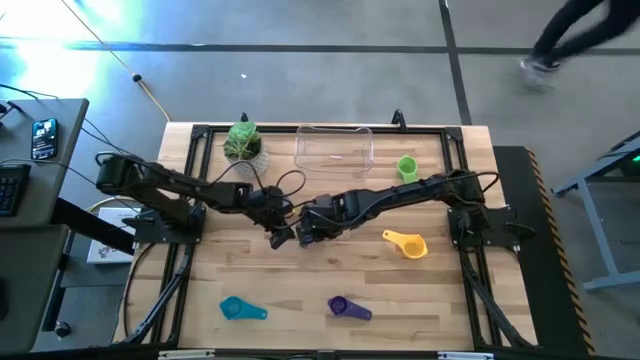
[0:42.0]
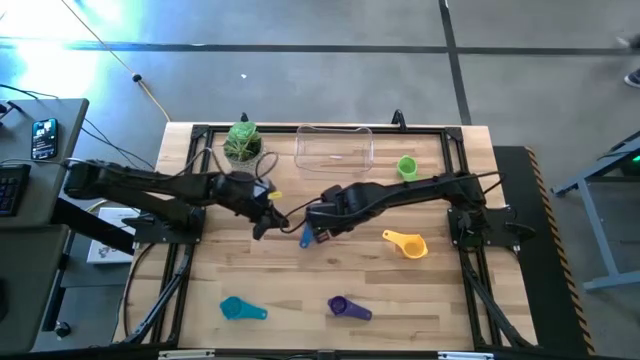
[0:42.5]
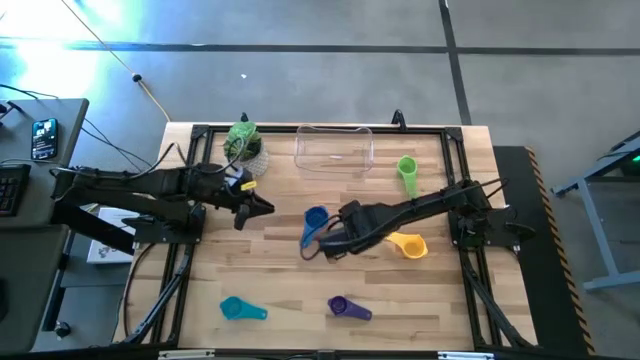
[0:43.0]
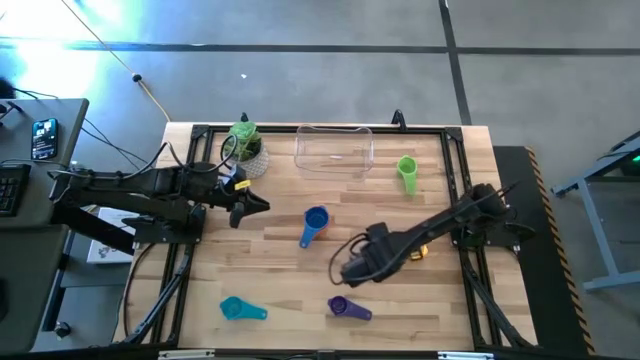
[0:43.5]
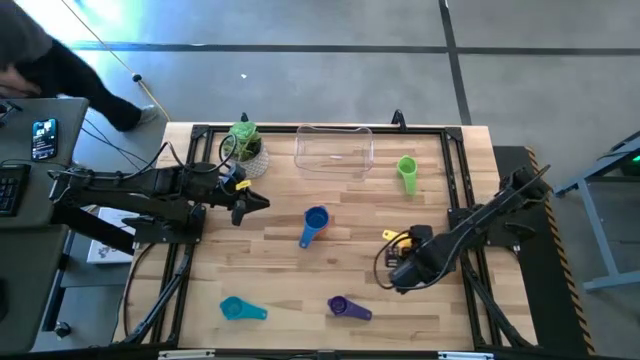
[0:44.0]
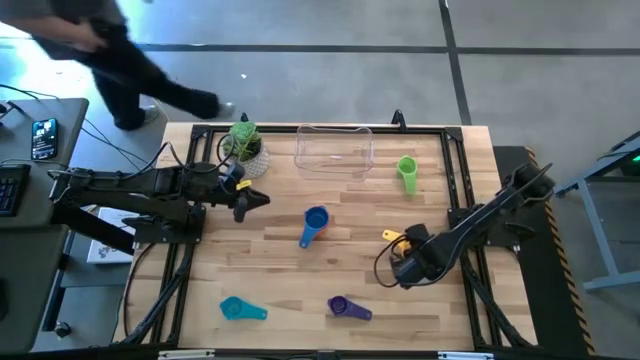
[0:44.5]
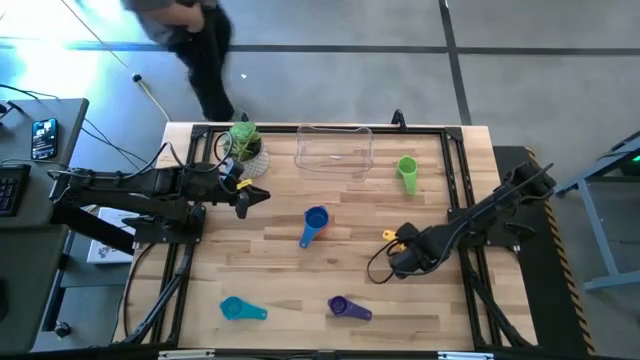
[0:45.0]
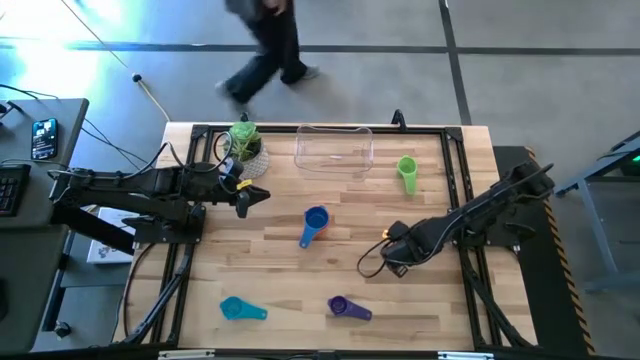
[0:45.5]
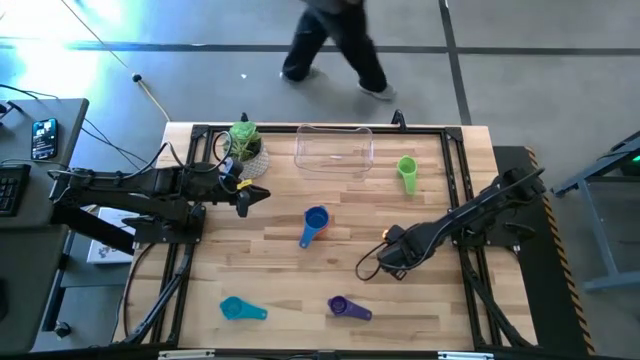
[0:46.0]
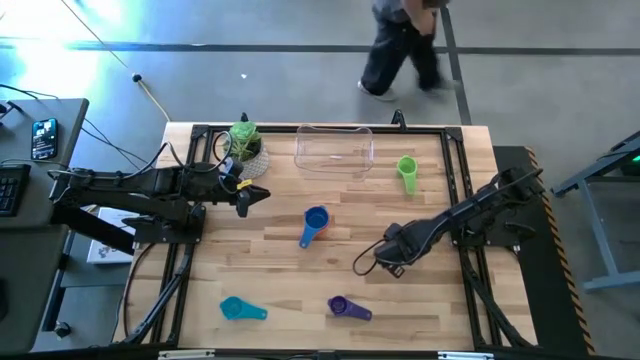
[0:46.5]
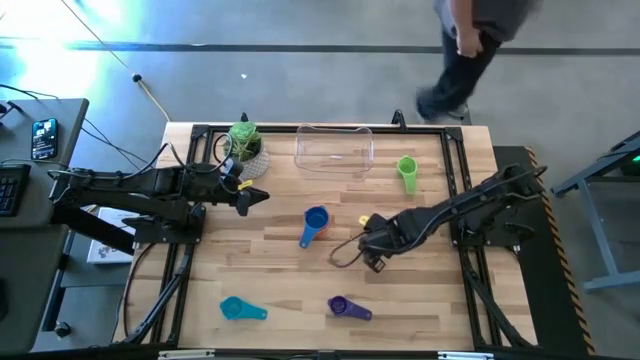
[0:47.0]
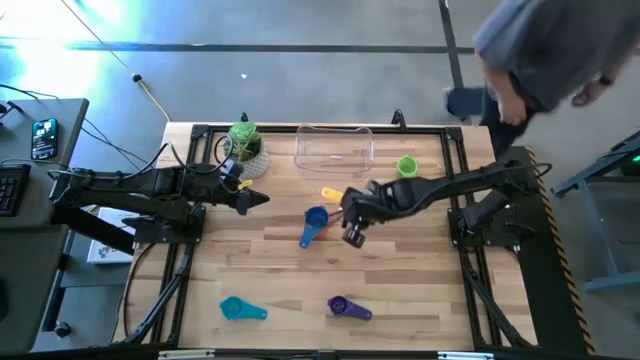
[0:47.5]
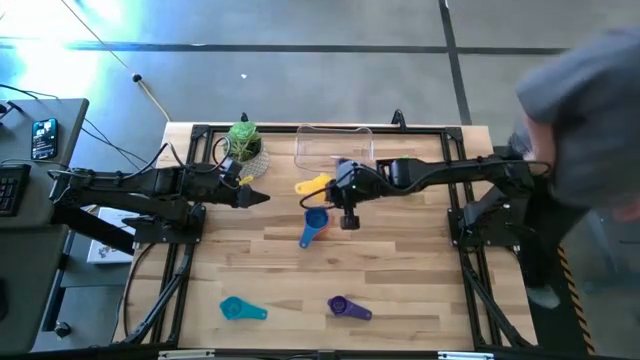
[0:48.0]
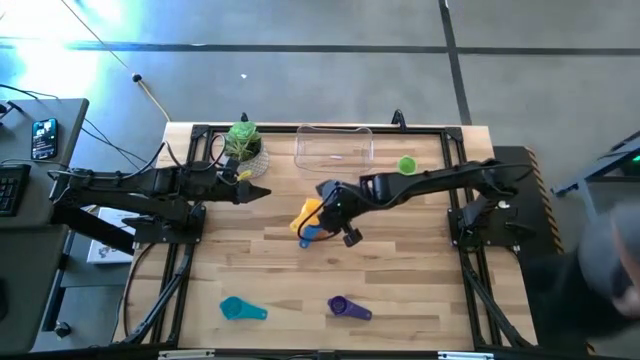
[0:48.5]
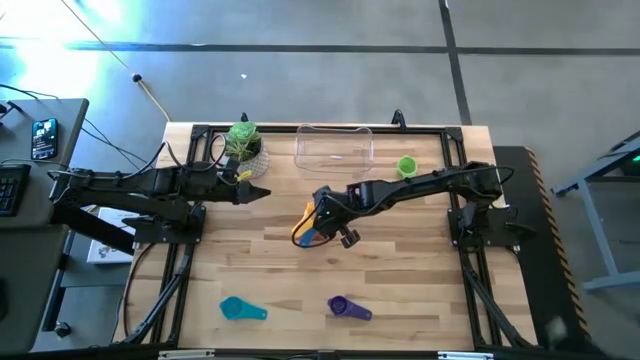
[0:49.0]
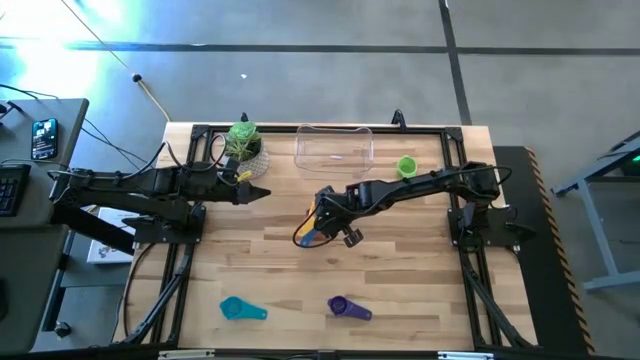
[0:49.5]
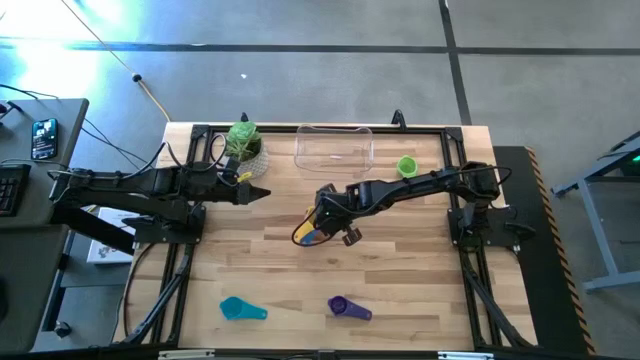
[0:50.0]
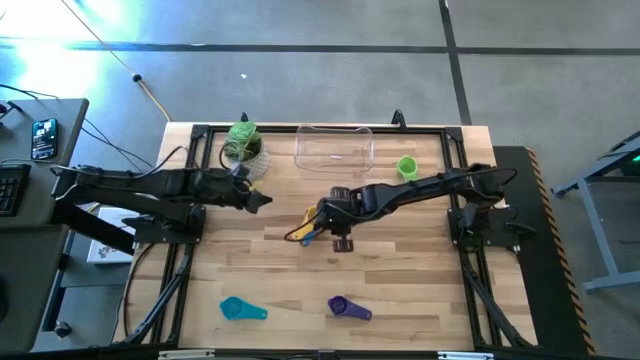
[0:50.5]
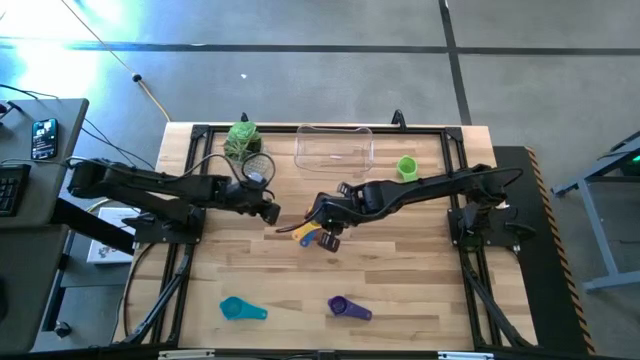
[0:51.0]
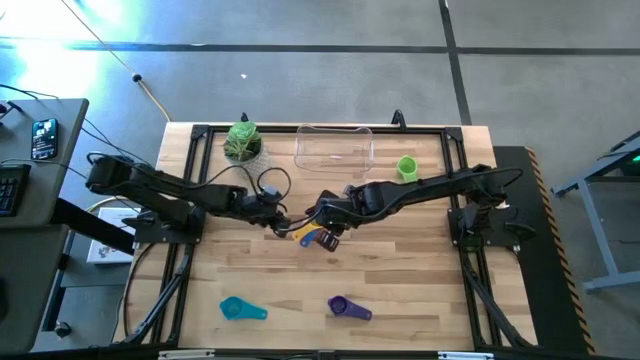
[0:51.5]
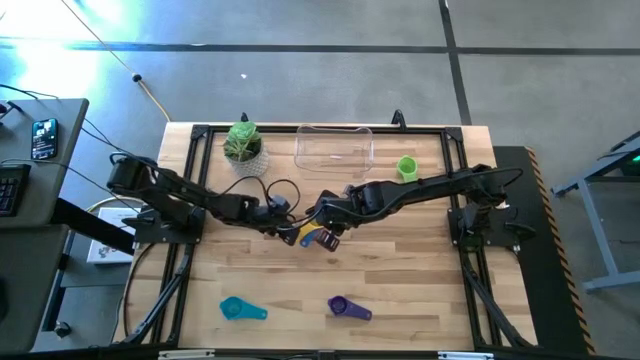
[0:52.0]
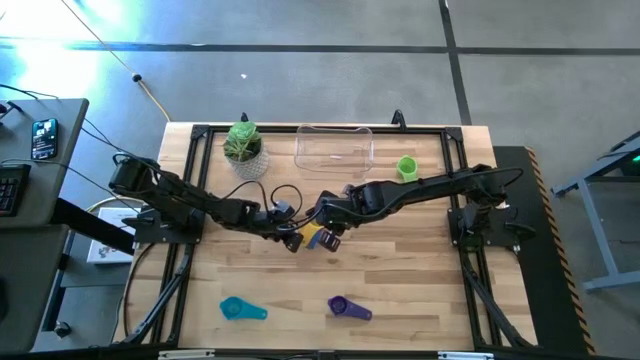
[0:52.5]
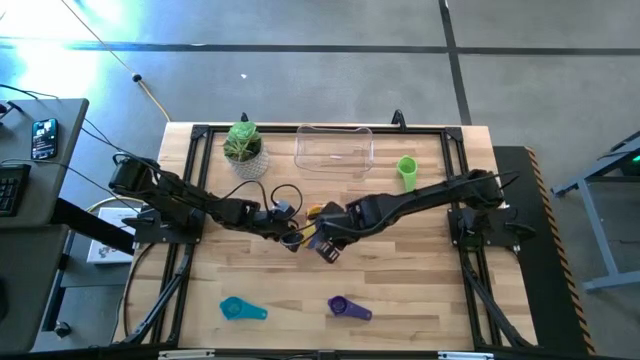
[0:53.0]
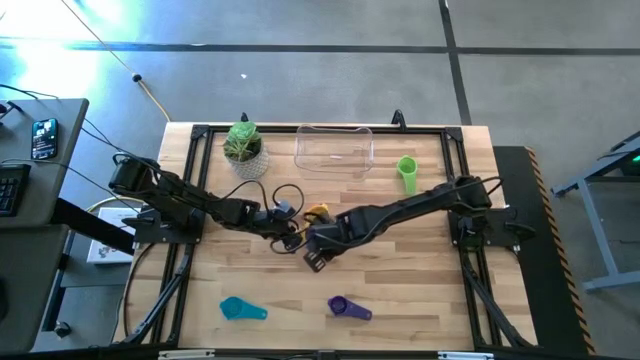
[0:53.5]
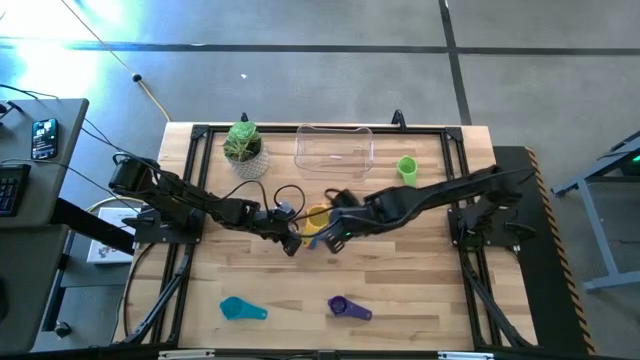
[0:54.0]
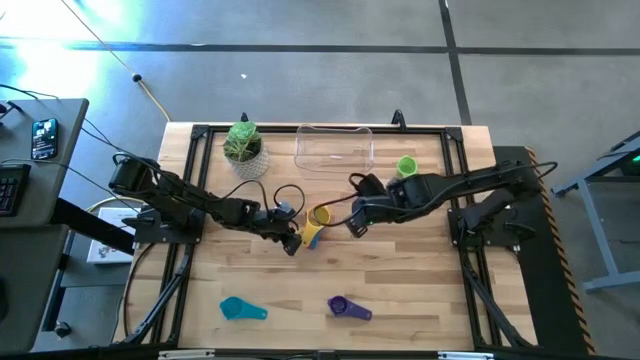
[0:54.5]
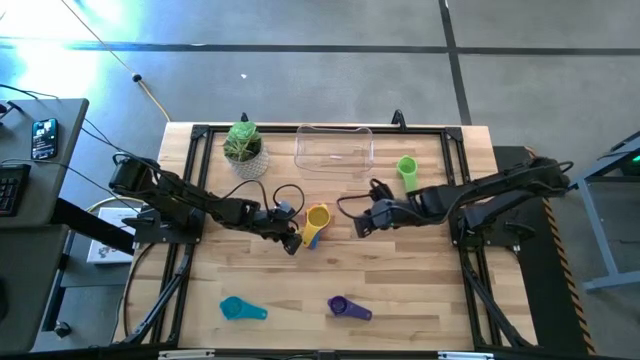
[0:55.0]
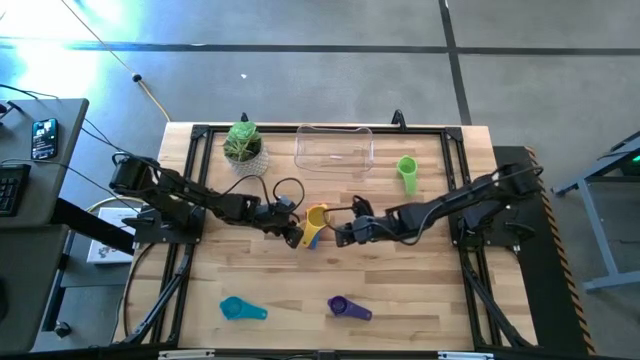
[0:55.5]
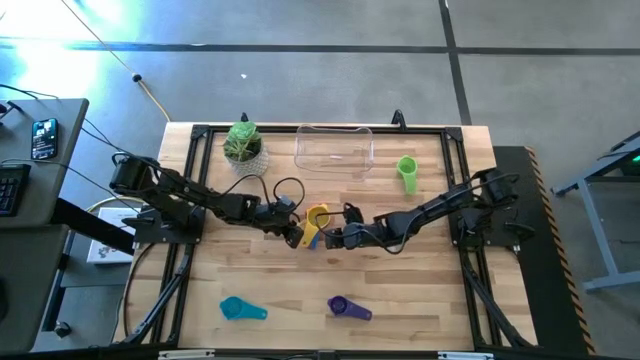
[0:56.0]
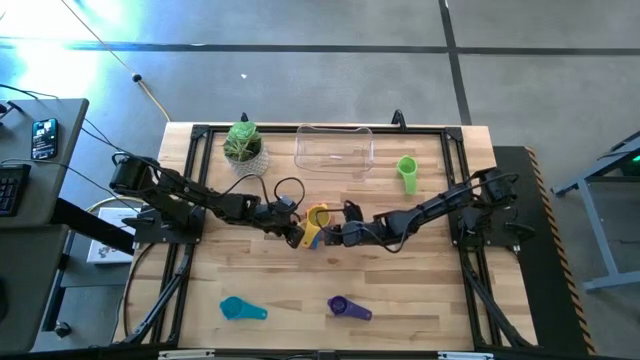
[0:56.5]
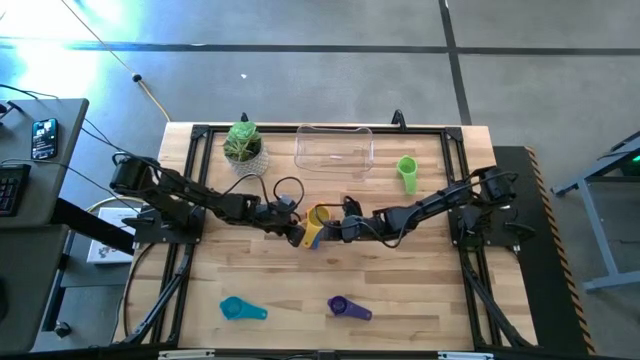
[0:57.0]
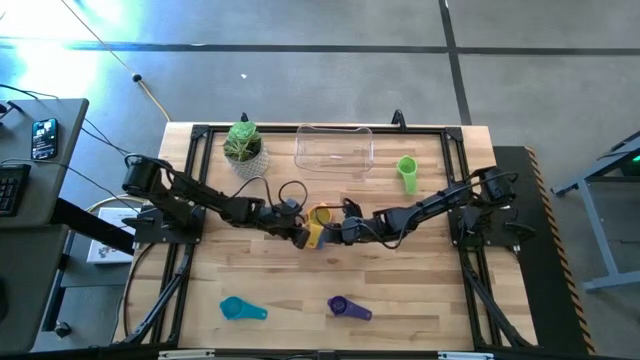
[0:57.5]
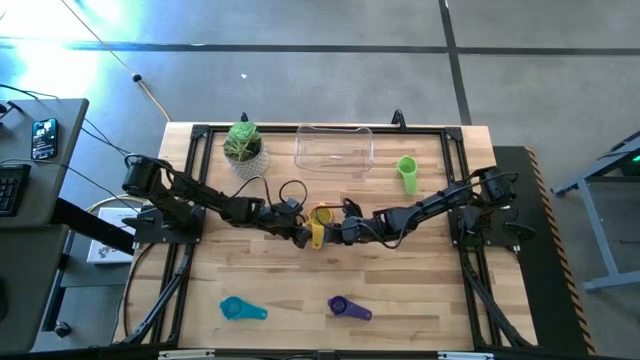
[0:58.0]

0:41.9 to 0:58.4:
Task: Nest measuring cups in basket
Stack the yellow measuring cup on top of the blue measuring cup

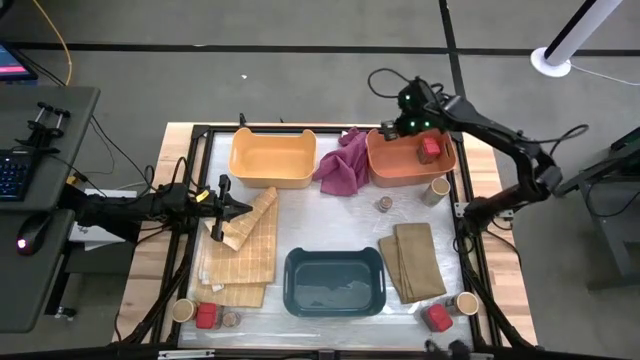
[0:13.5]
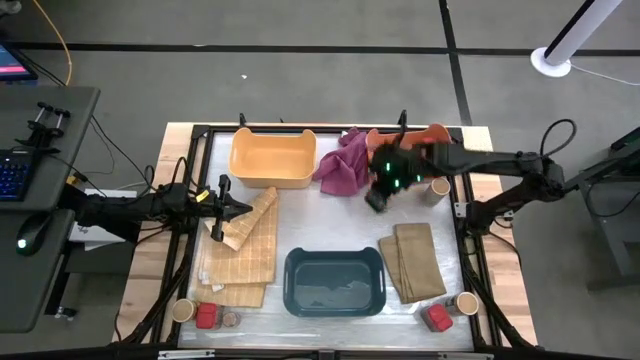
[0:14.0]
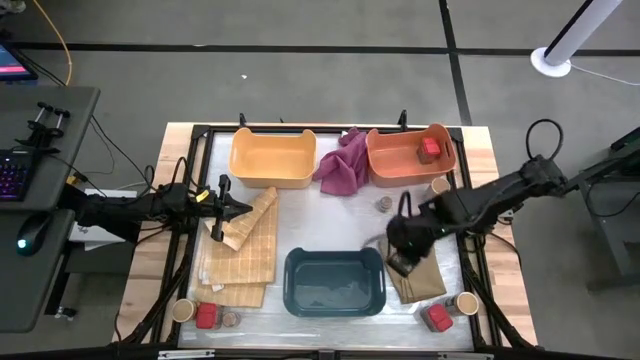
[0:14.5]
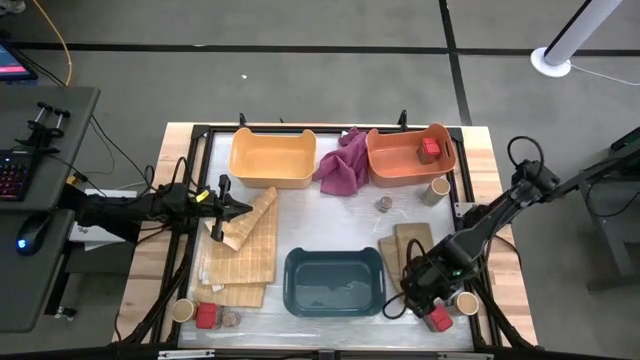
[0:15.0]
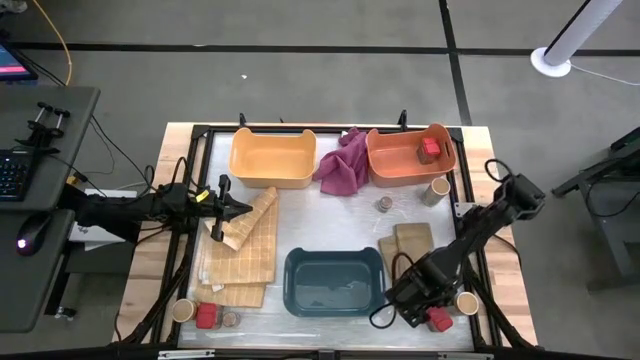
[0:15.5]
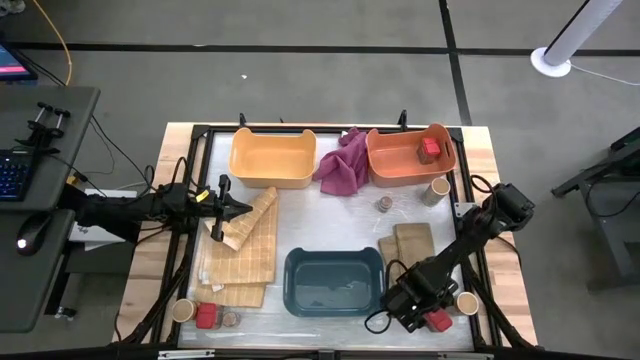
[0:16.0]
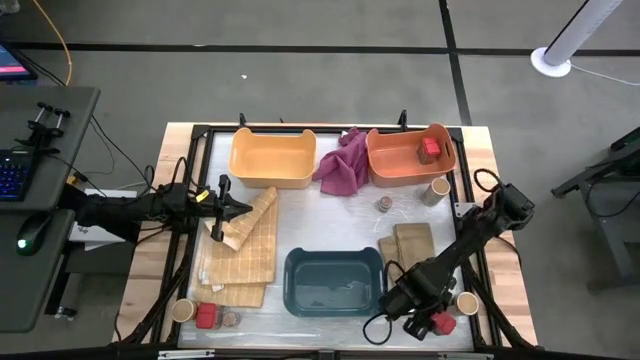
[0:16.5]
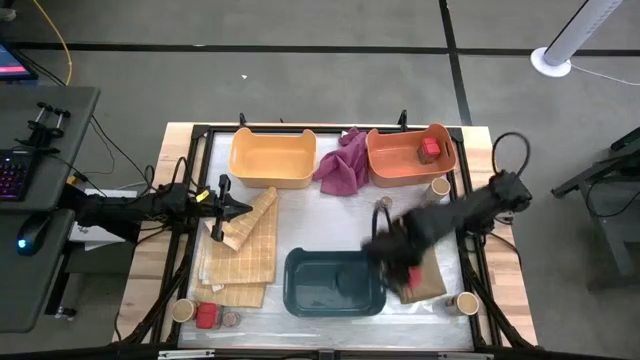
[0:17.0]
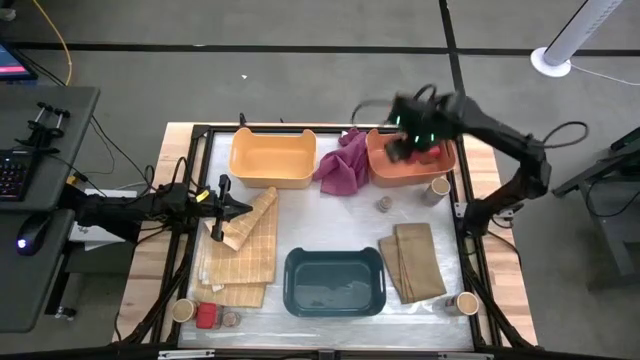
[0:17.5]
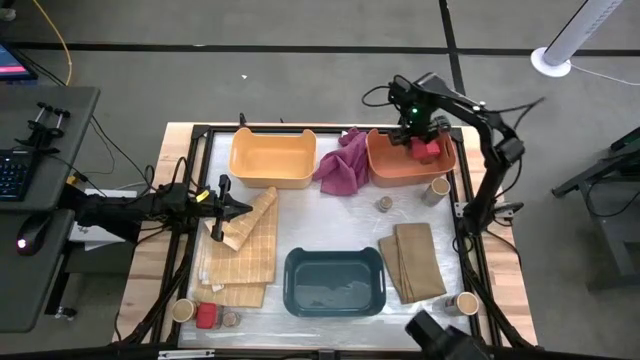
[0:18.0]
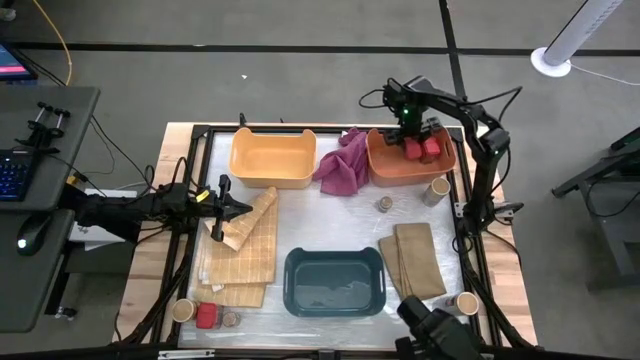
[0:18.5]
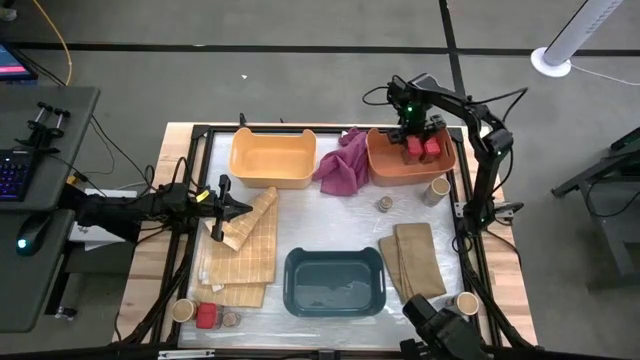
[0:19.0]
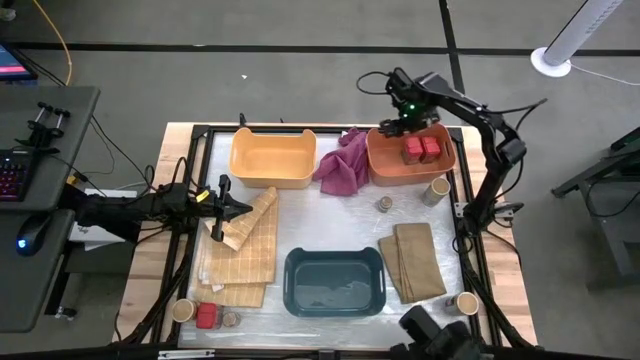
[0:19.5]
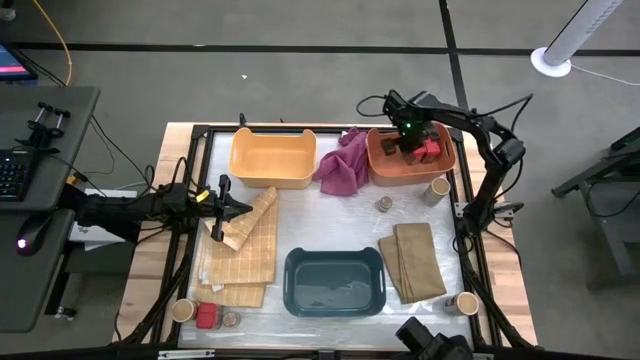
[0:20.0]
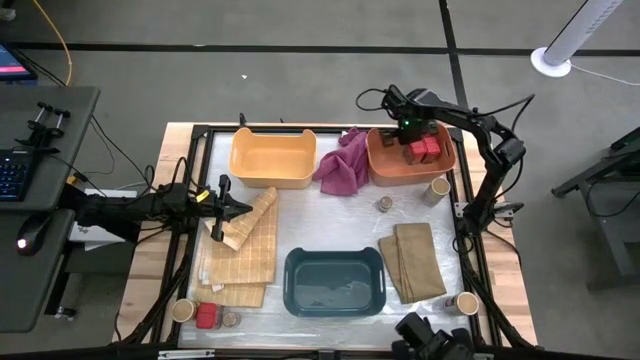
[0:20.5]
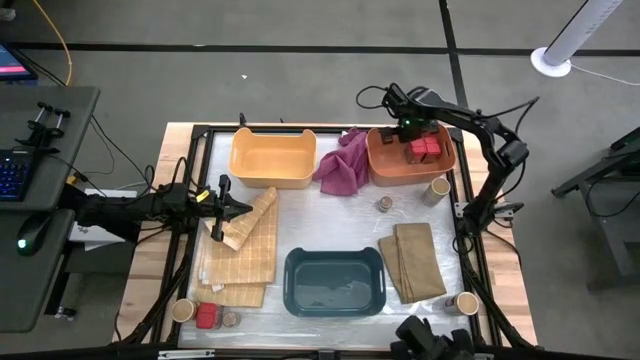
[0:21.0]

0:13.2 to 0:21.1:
Task: Sort spices by type
Put the right red seasoning can into the orange bin
